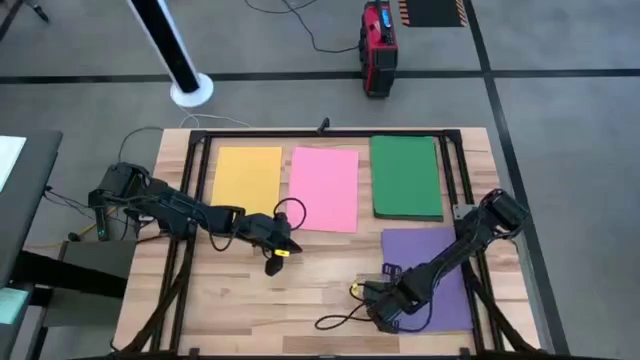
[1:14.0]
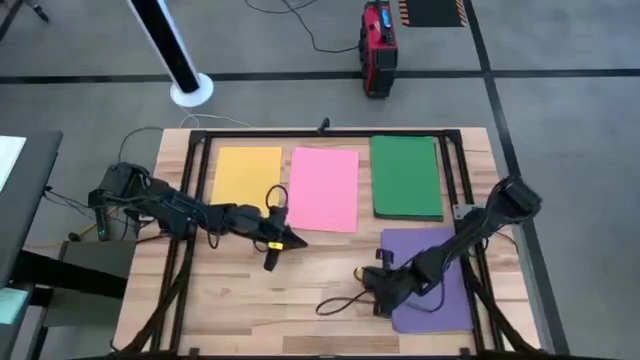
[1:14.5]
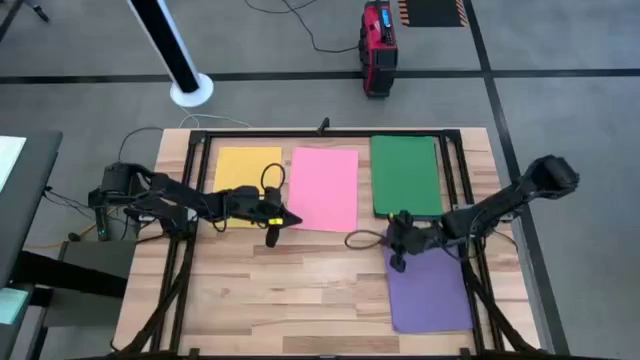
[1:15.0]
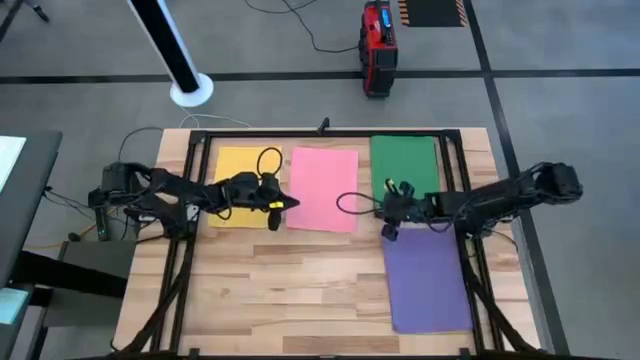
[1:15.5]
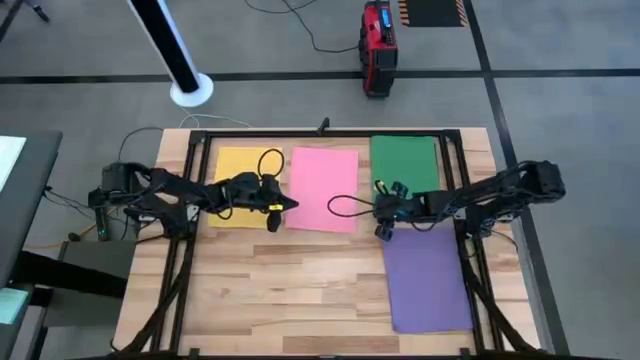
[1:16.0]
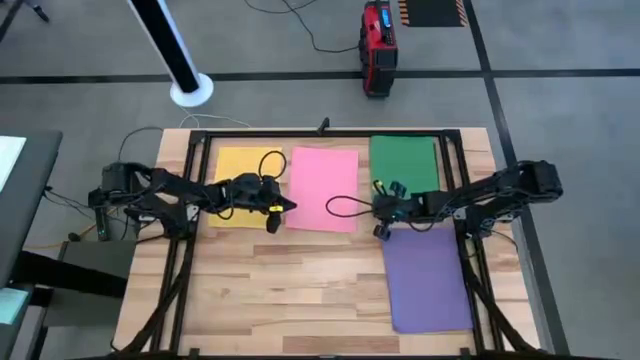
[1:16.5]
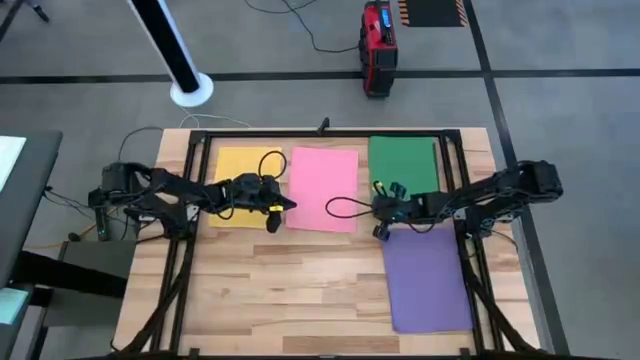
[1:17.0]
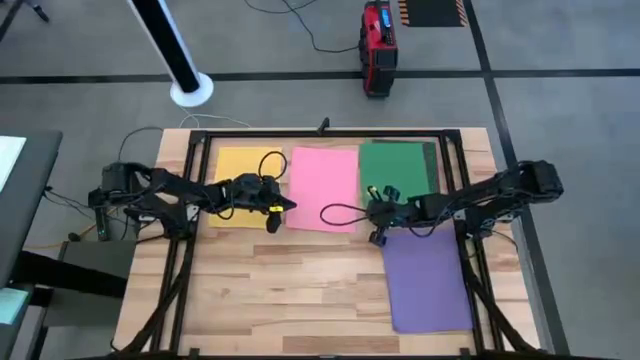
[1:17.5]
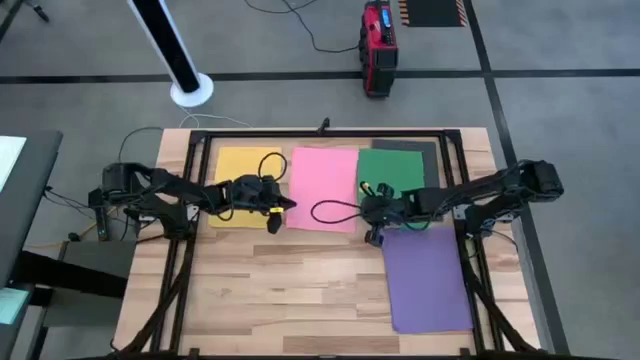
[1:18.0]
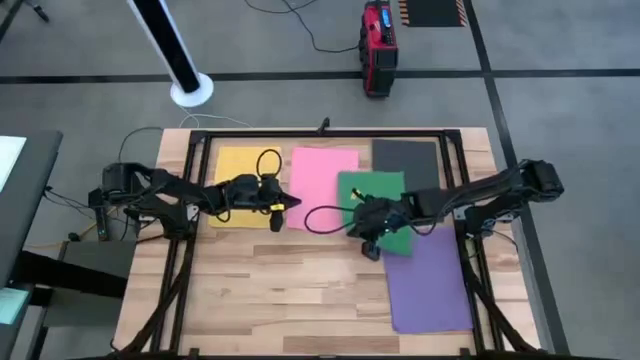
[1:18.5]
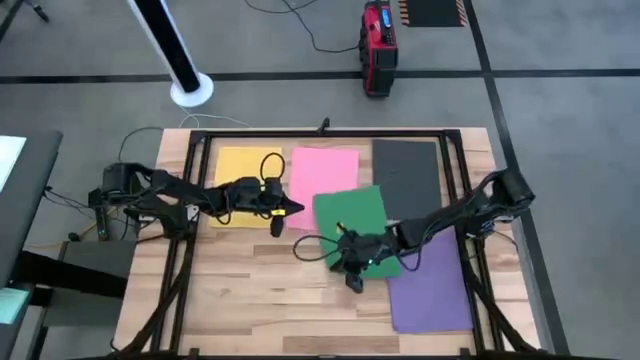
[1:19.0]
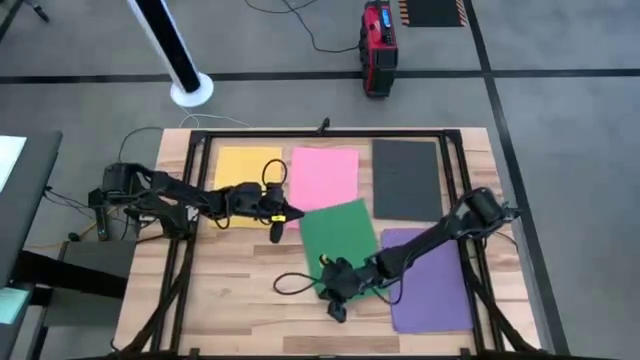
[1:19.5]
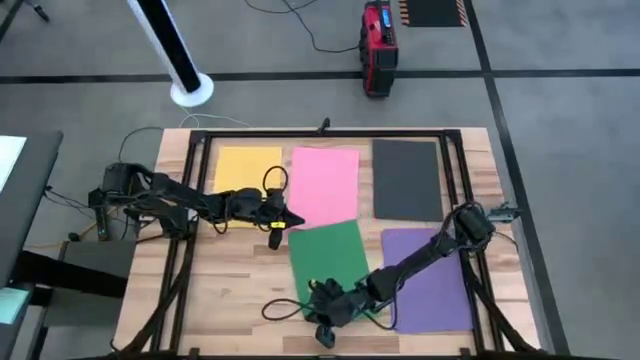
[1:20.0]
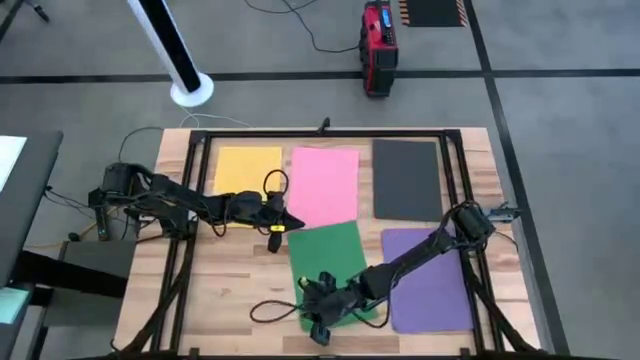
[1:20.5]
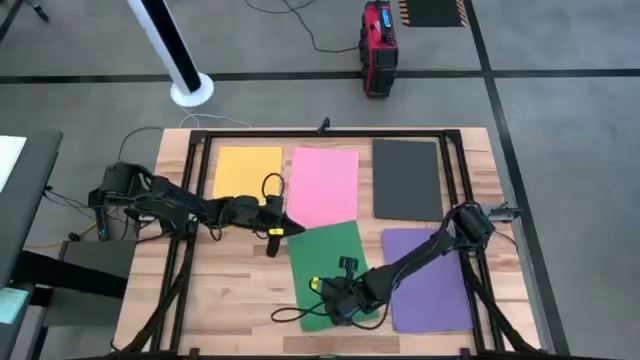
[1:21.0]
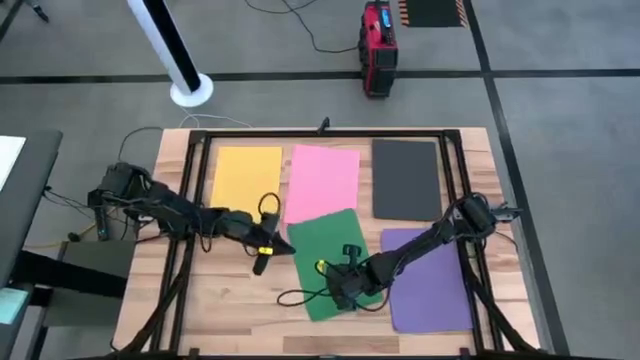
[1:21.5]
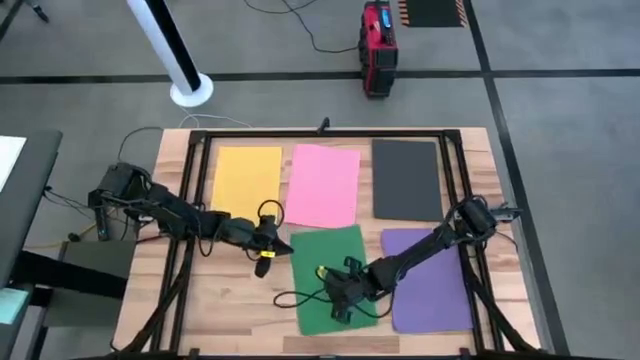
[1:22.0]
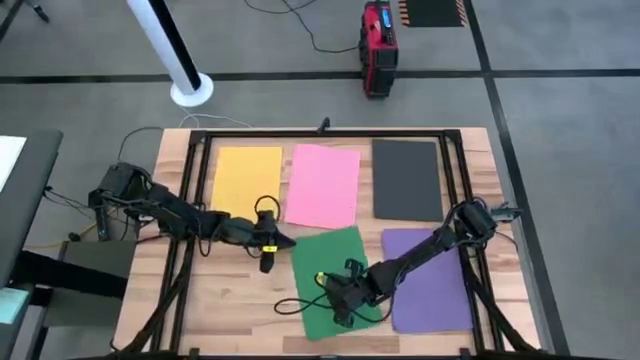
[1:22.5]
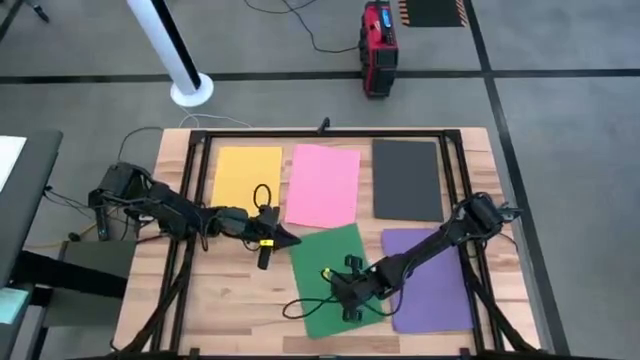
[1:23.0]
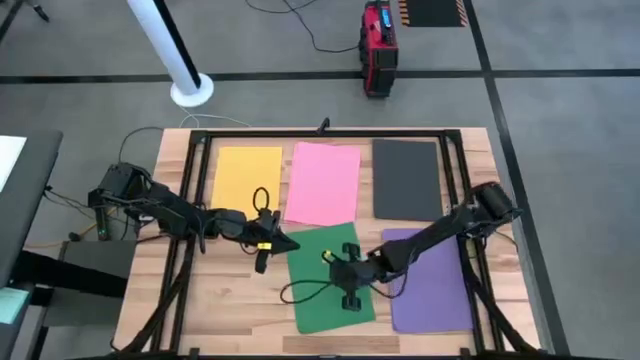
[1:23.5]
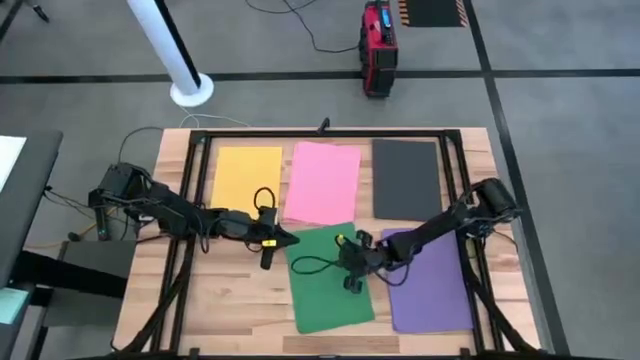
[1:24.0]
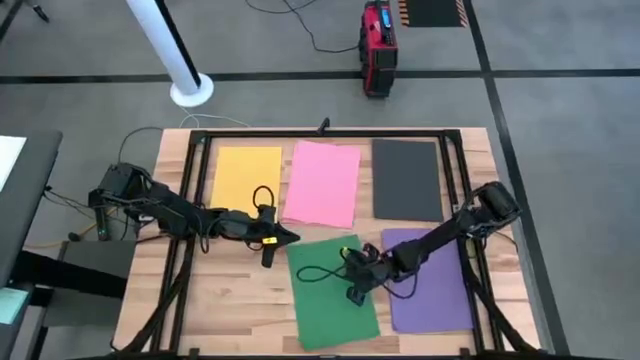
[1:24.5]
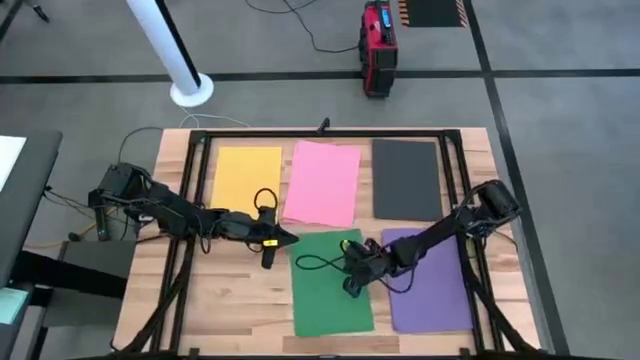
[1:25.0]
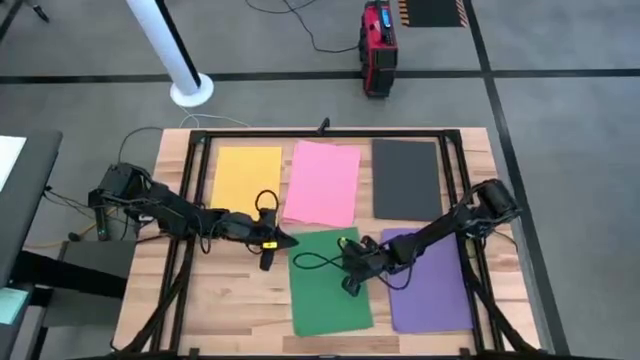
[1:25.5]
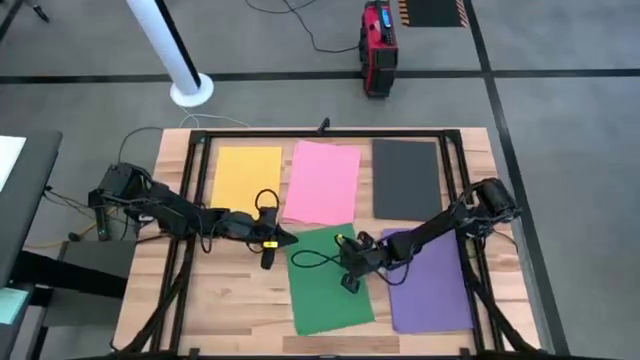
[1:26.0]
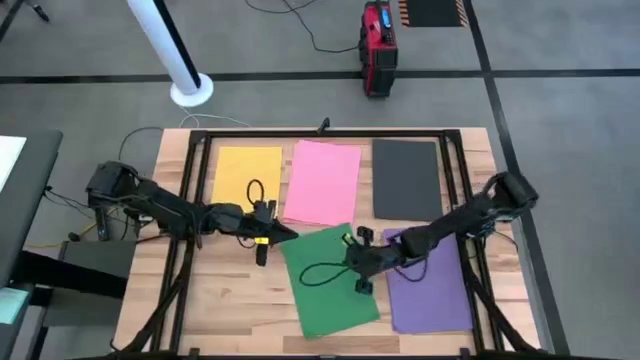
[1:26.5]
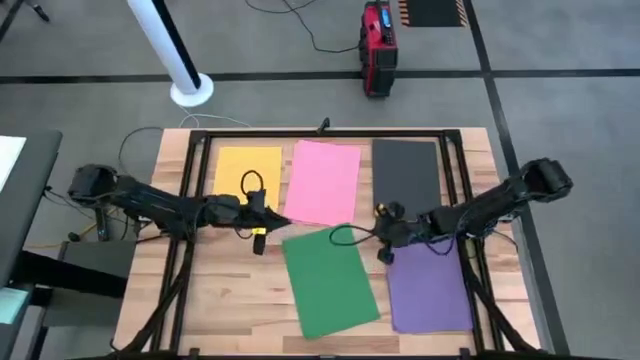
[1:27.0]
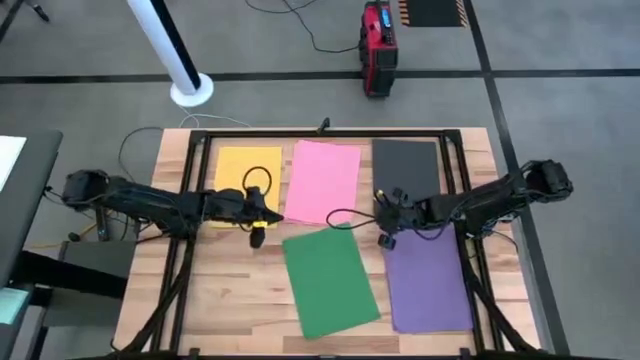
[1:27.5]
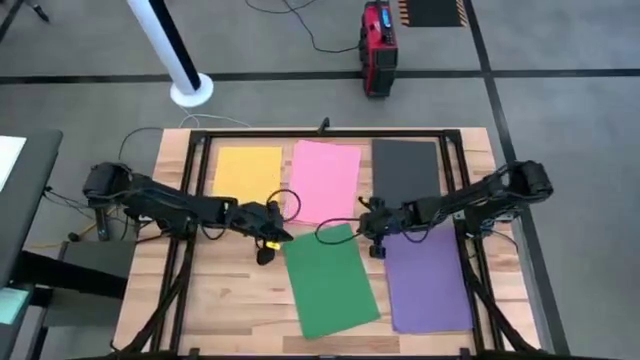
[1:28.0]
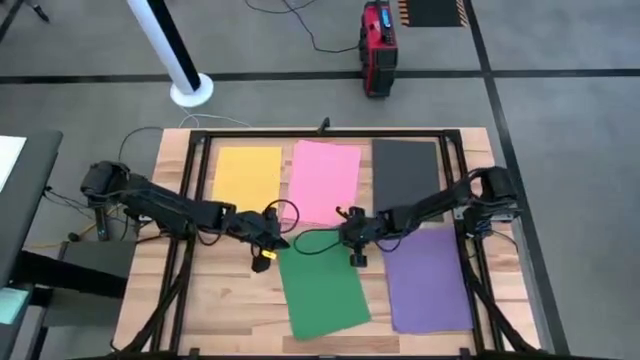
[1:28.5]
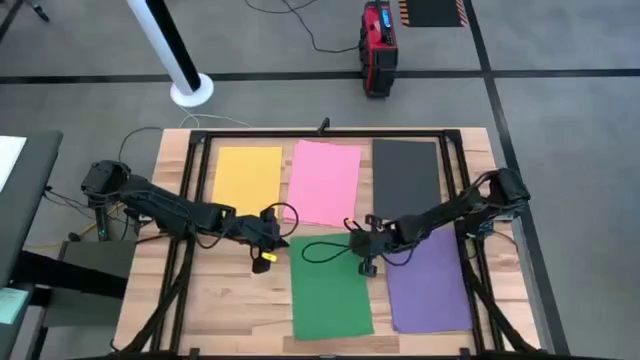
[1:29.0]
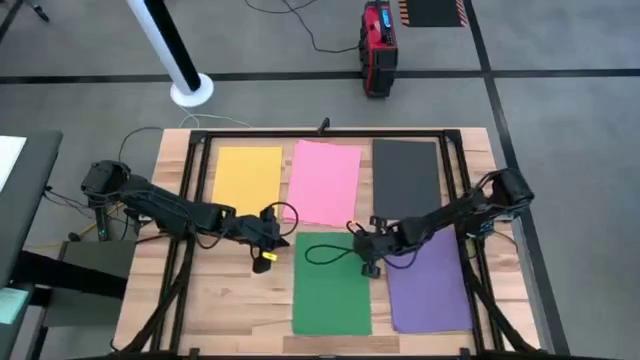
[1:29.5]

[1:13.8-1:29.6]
Task: Organize paper
Move the green colored paper to the bottom center of the table

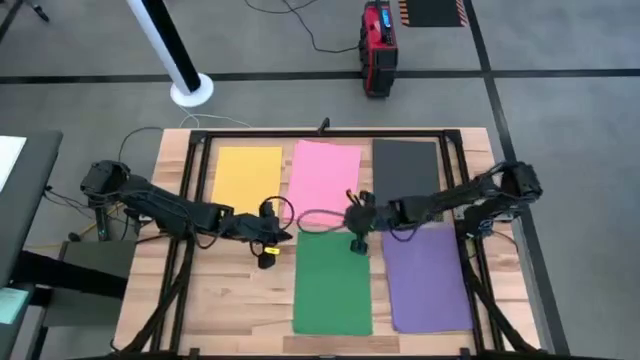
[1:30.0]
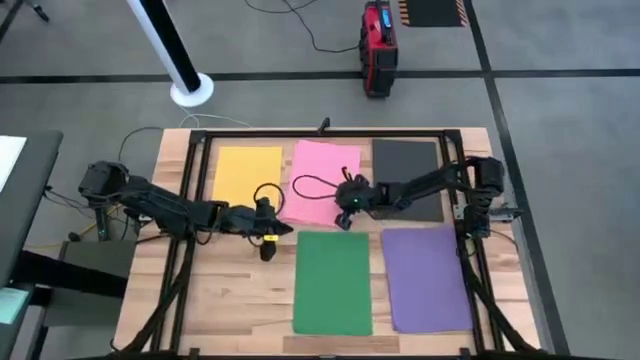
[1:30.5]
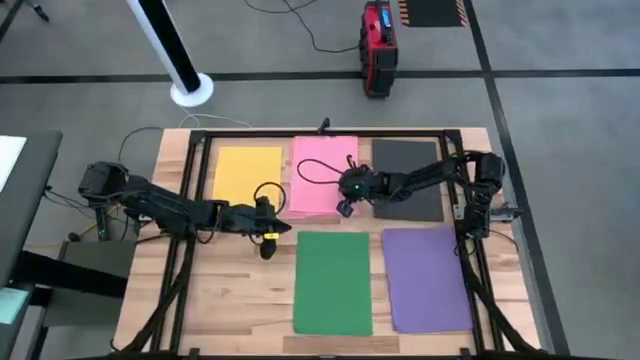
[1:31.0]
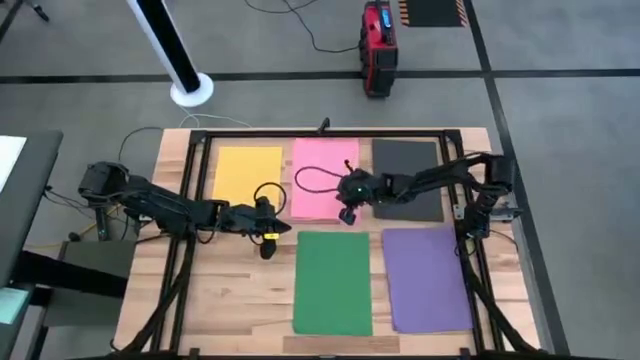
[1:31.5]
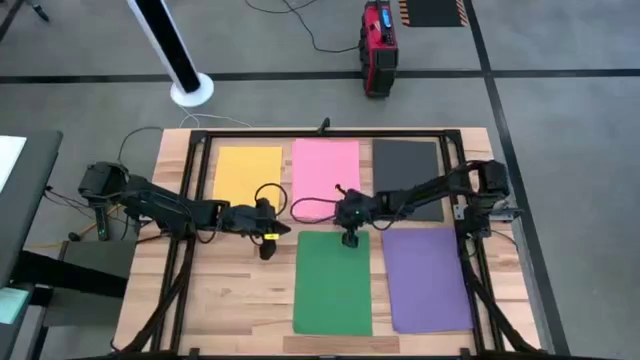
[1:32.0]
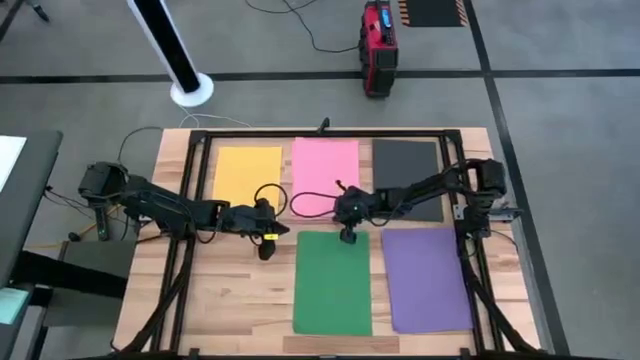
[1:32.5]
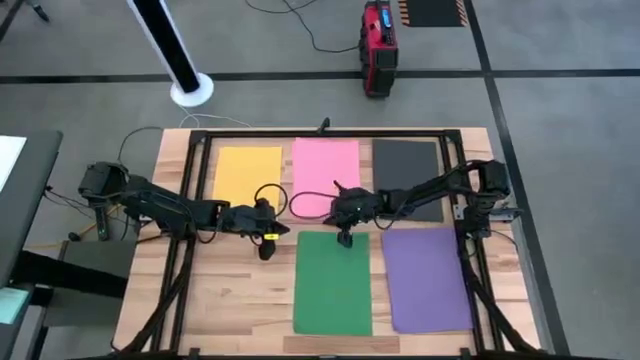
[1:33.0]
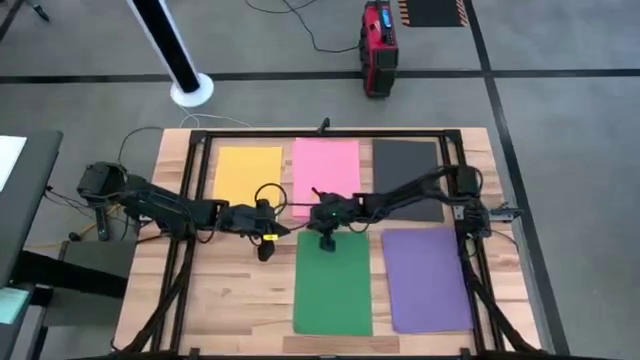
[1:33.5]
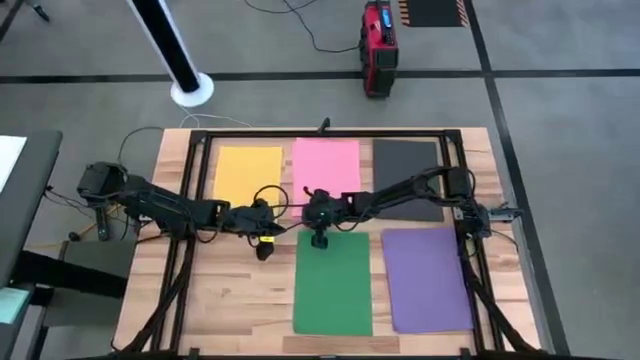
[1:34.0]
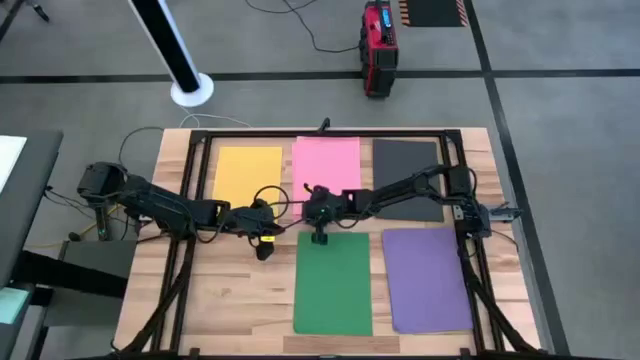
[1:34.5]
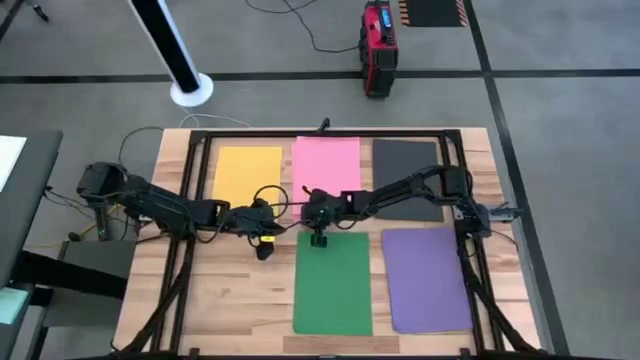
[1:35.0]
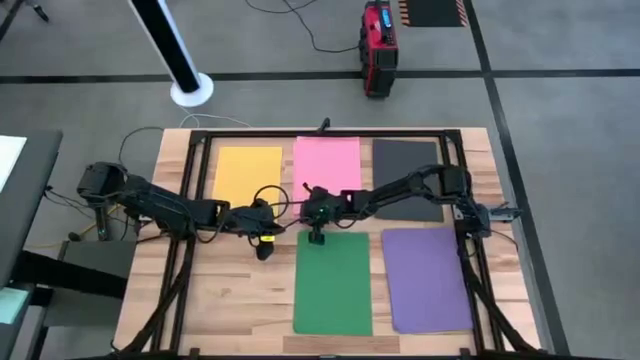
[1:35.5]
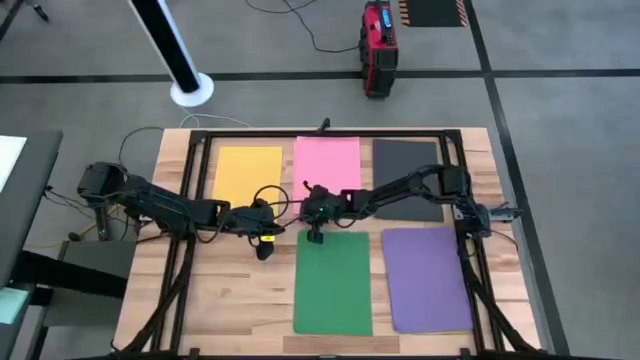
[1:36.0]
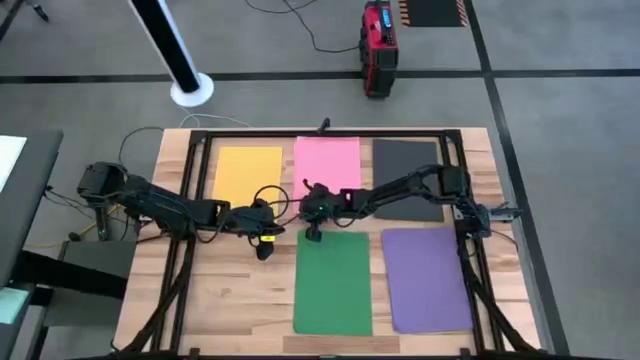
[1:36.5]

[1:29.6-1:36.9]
Adjust the stacked pink colored papers
